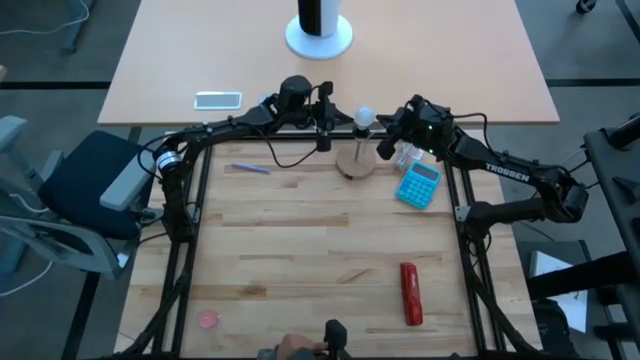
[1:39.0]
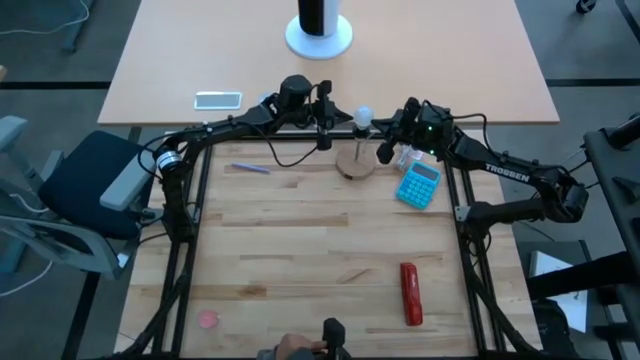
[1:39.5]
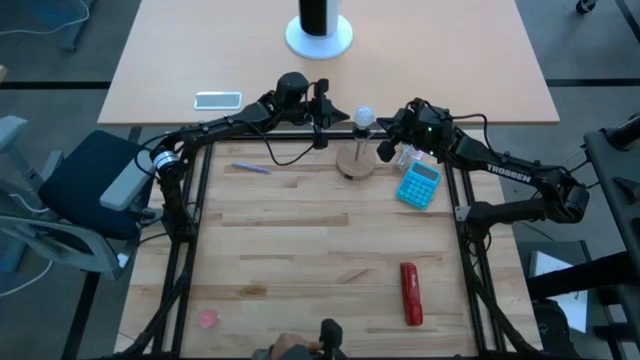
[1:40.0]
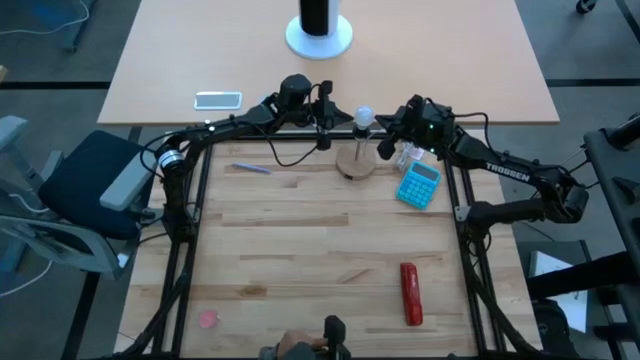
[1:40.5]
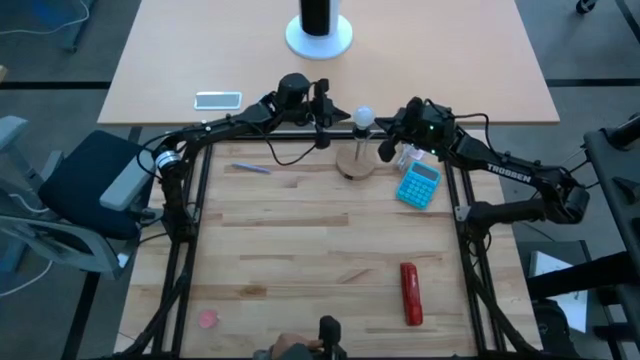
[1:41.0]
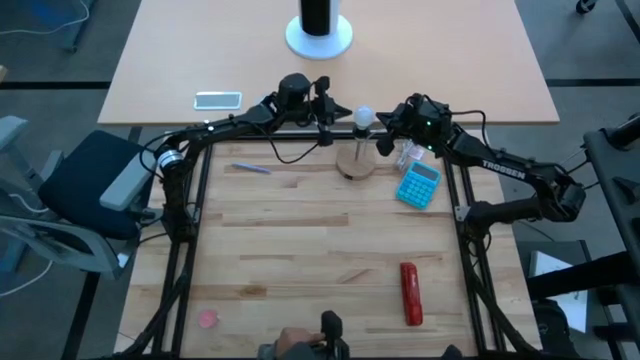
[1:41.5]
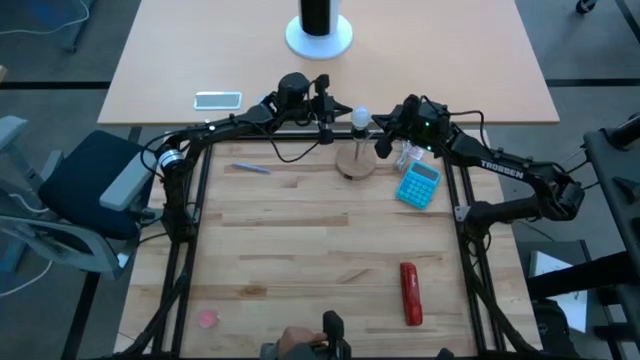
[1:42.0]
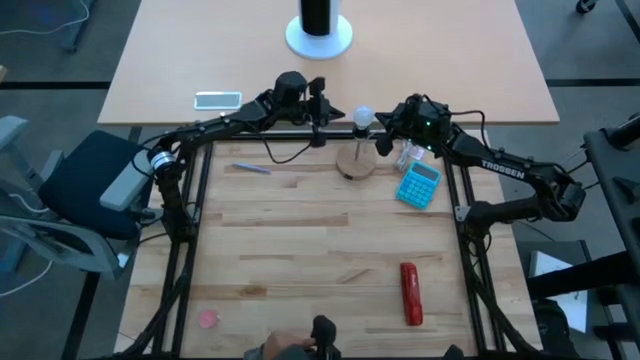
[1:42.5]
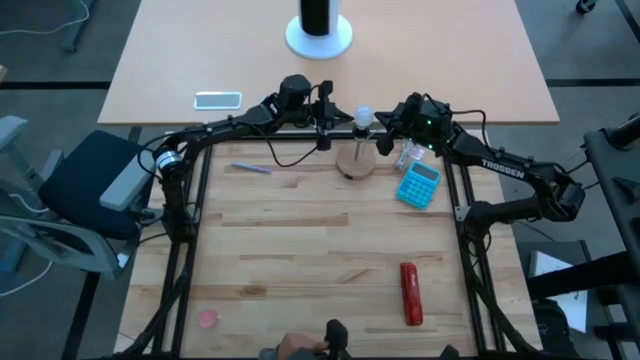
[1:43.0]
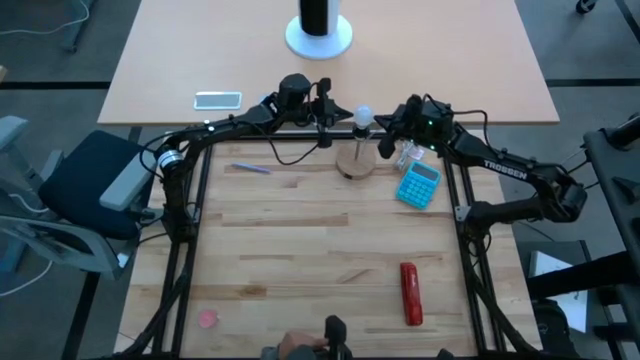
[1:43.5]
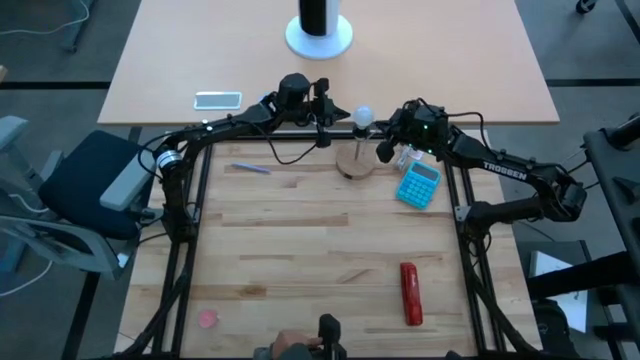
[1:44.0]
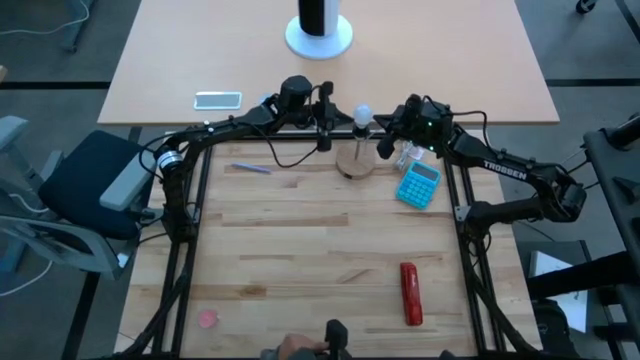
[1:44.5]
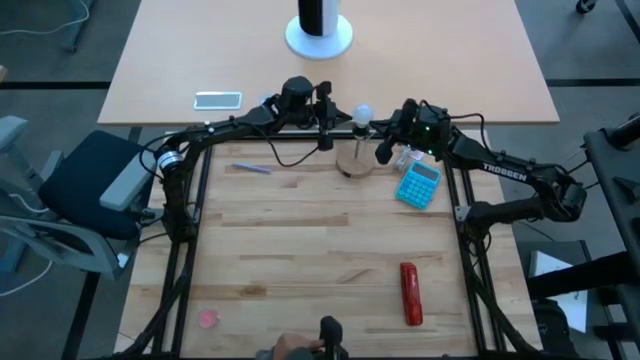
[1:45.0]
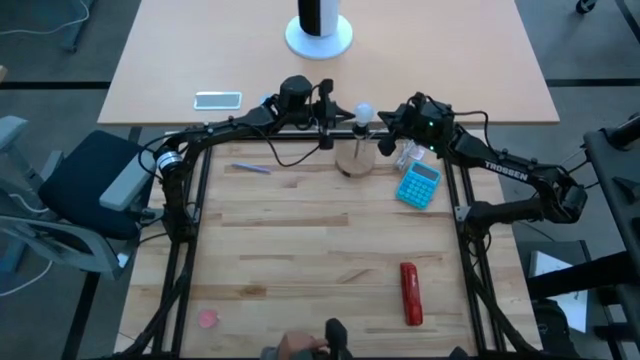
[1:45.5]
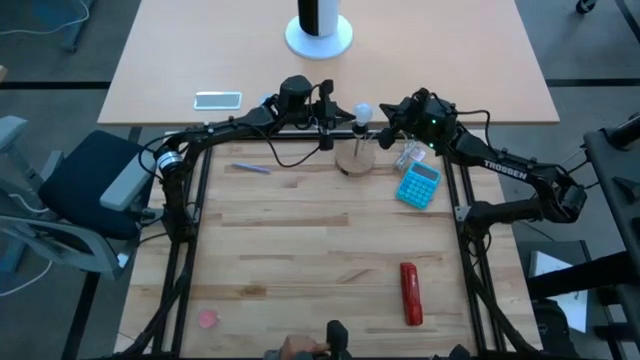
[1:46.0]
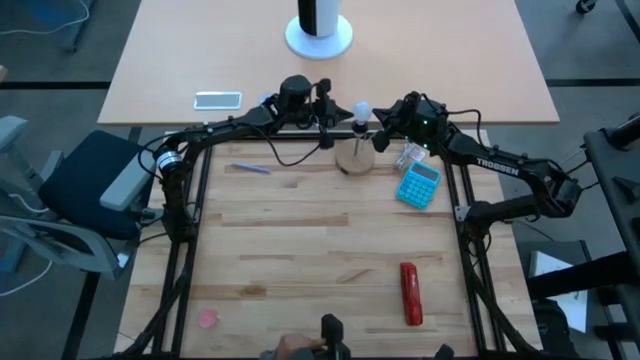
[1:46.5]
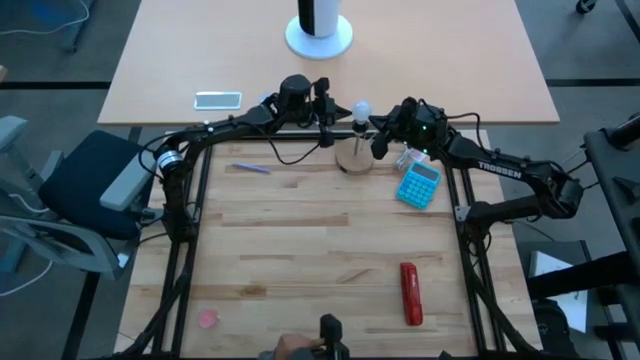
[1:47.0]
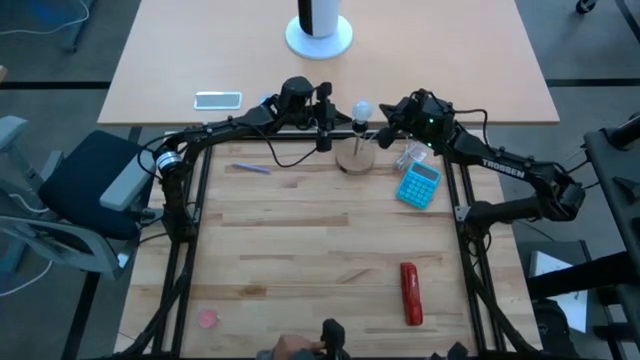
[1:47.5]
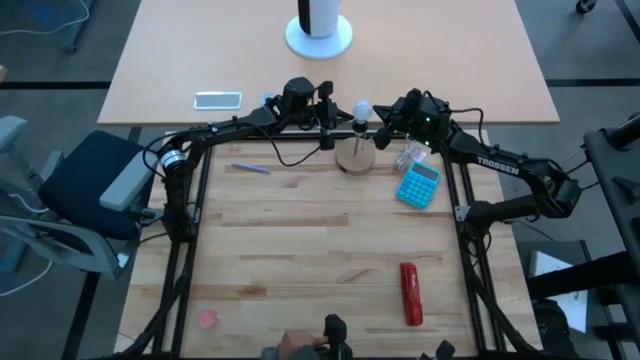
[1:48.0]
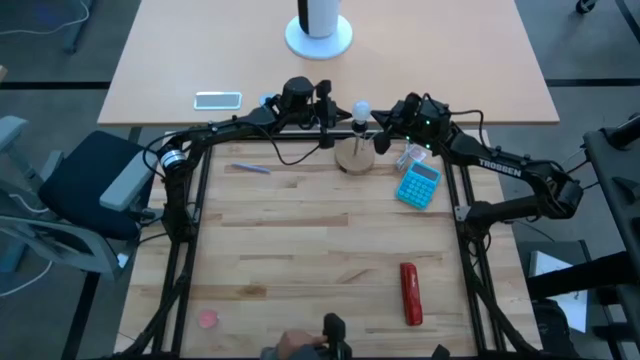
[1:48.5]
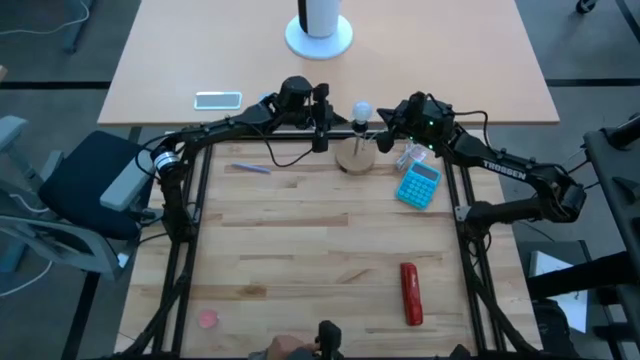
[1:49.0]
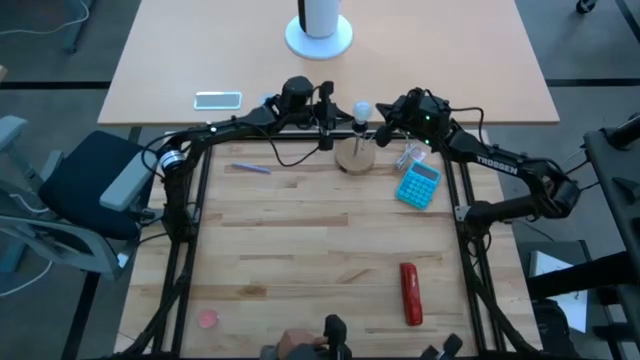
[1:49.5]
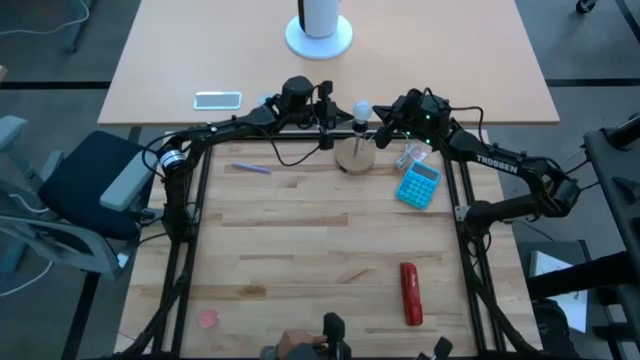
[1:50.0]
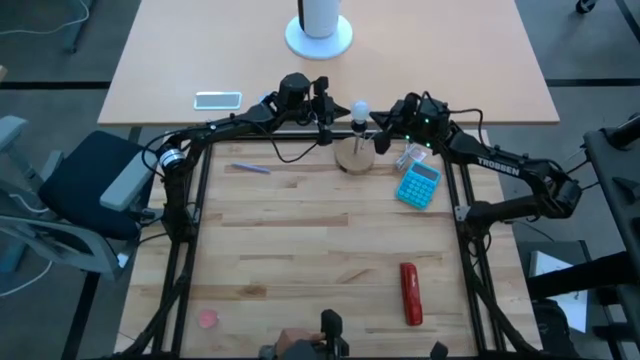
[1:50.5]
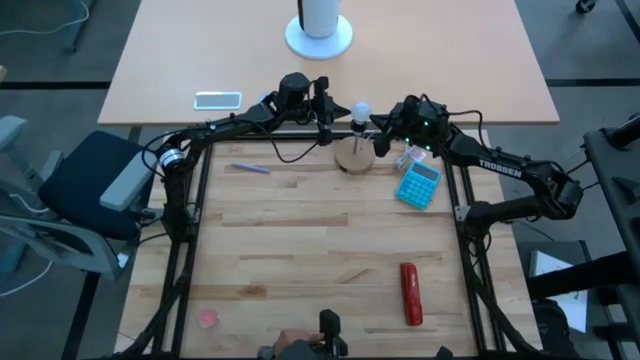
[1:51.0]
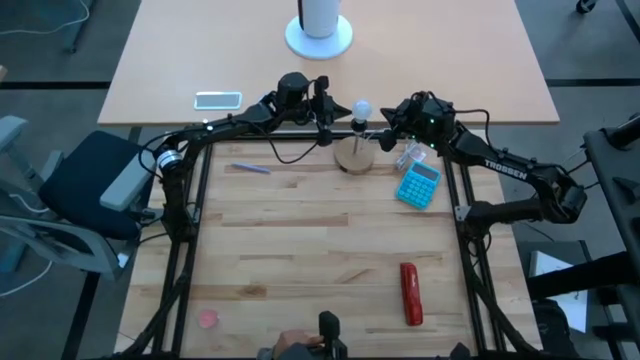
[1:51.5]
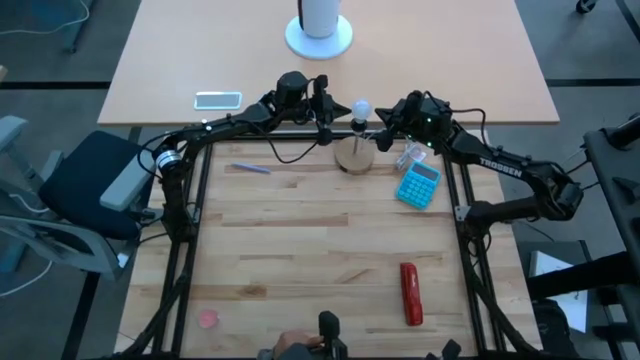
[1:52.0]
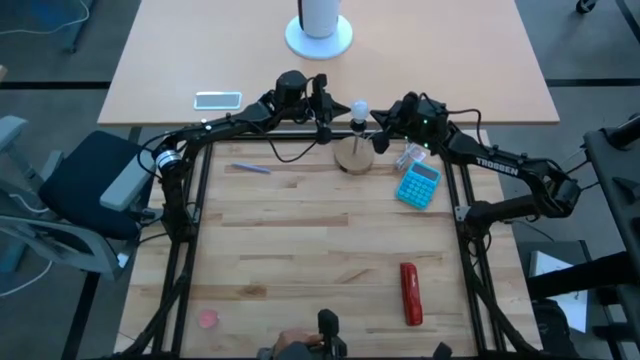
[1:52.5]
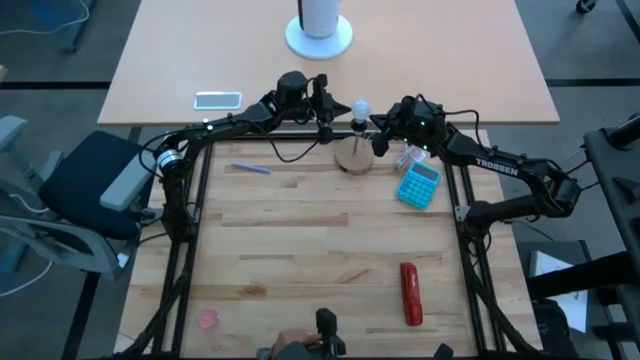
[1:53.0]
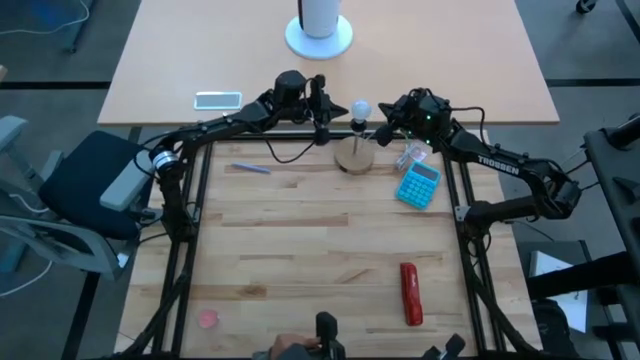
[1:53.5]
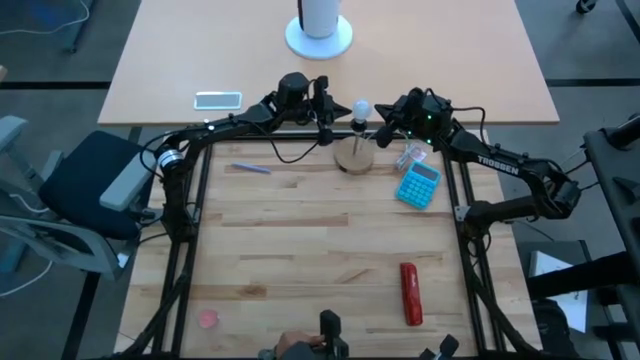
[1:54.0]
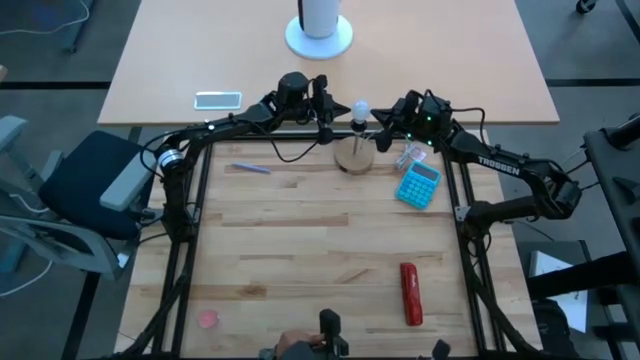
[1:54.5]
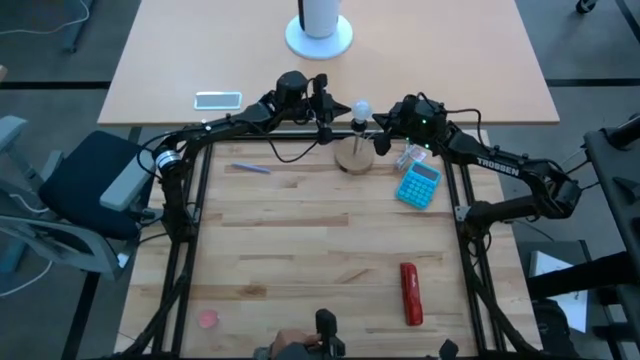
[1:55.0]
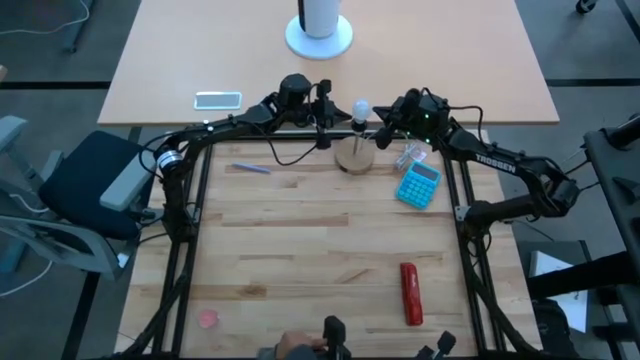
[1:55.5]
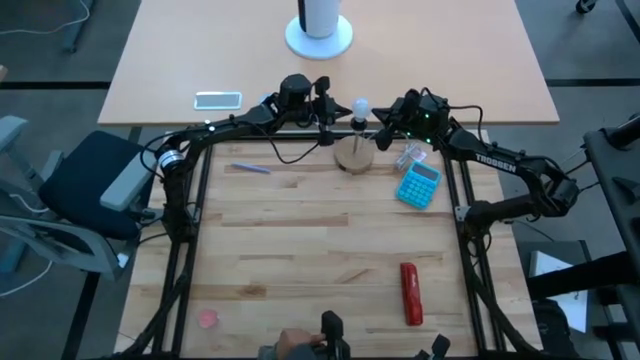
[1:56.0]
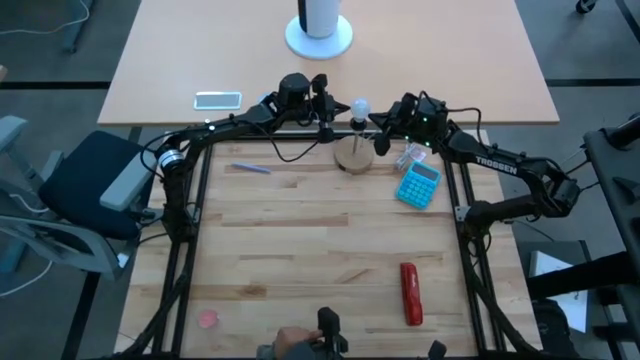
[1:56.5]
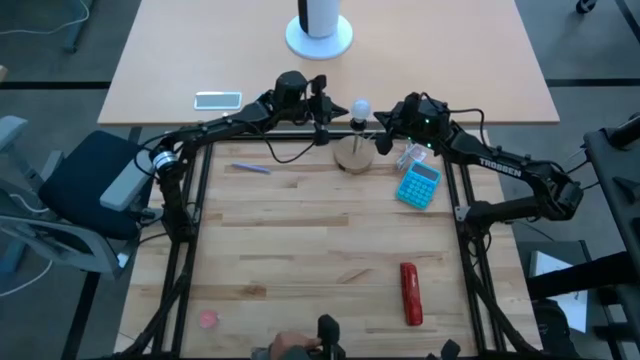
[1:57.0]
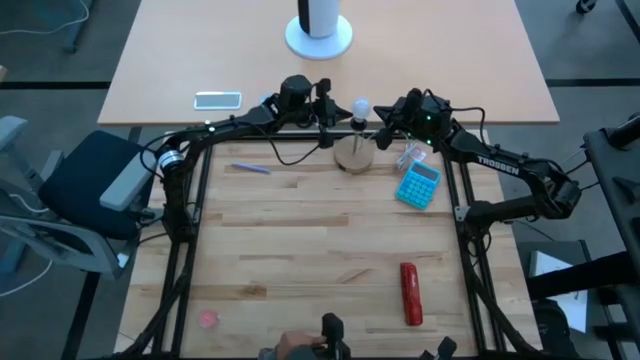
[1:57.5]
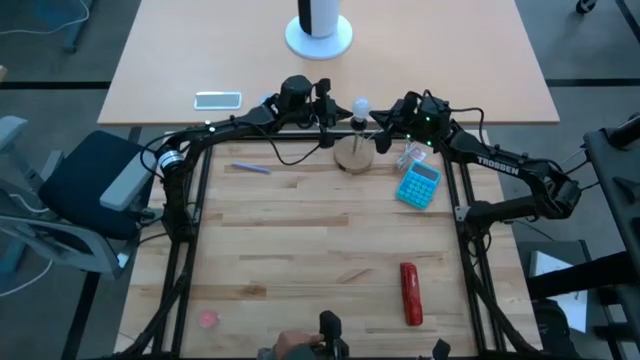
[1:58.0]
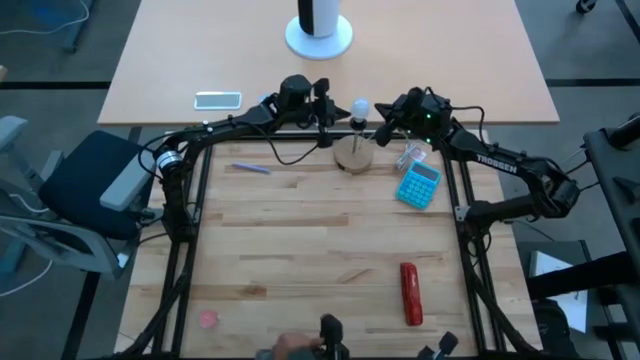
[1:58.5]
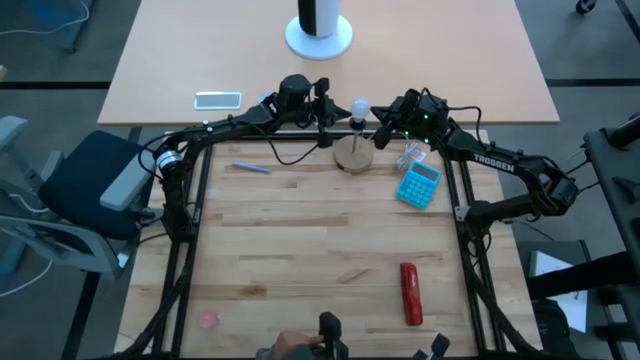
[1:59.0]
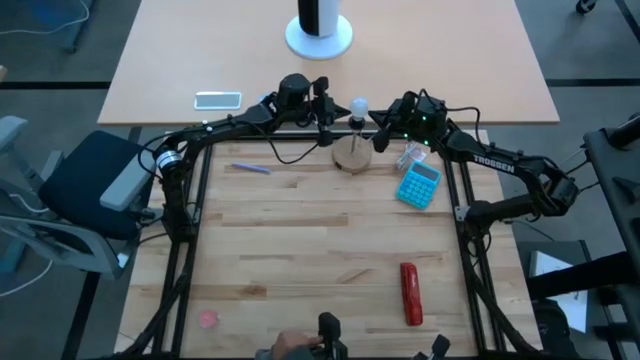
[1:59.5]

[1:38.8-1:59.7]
Task: Screw lightbulb
Insert the lightbulb into the lamp
